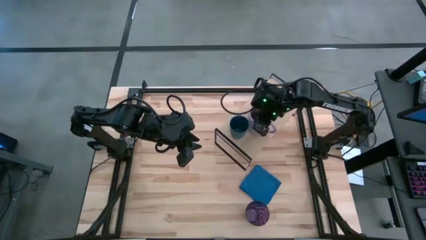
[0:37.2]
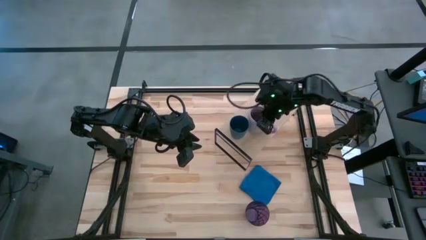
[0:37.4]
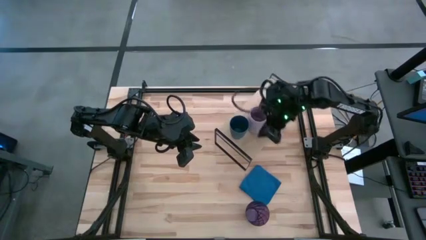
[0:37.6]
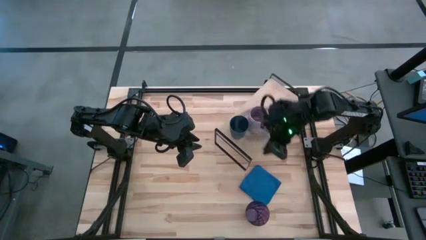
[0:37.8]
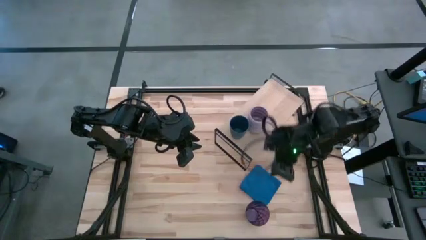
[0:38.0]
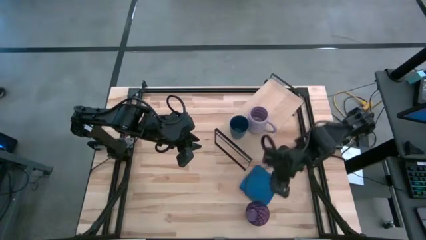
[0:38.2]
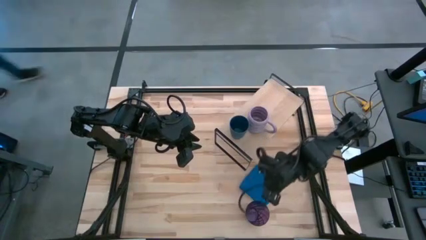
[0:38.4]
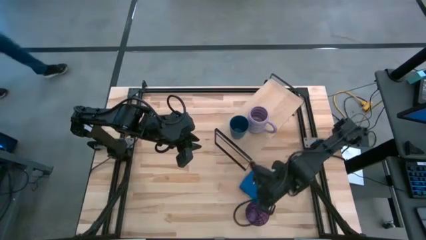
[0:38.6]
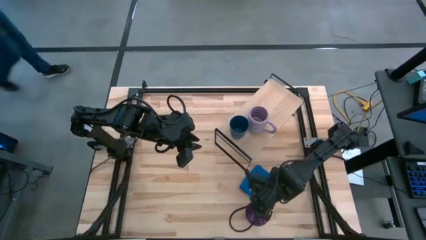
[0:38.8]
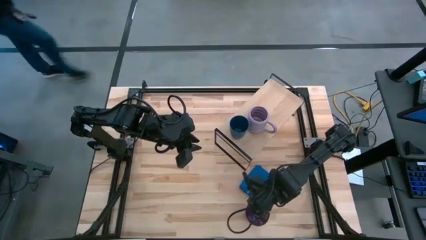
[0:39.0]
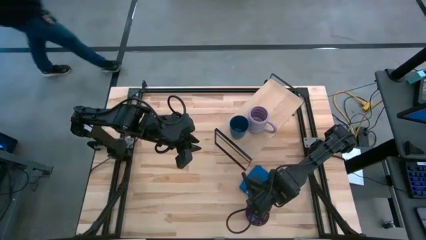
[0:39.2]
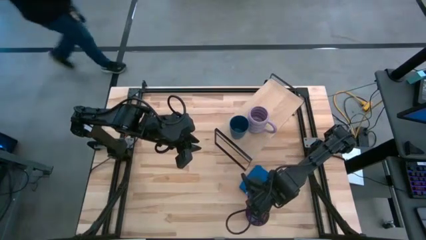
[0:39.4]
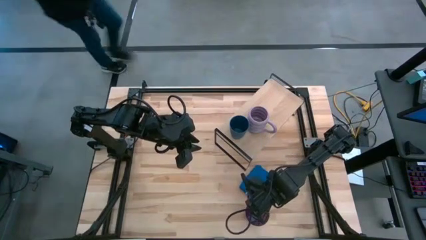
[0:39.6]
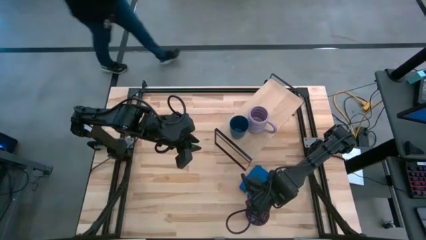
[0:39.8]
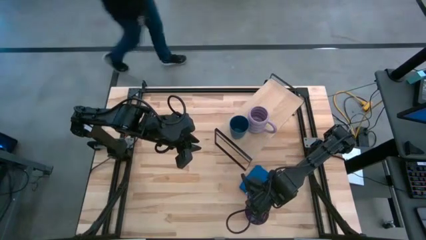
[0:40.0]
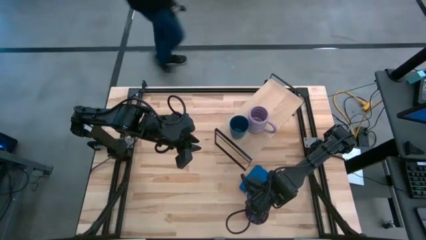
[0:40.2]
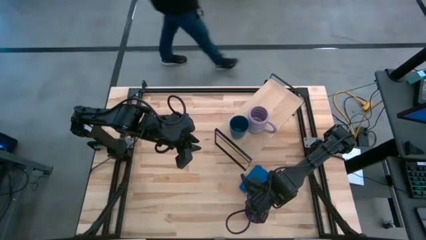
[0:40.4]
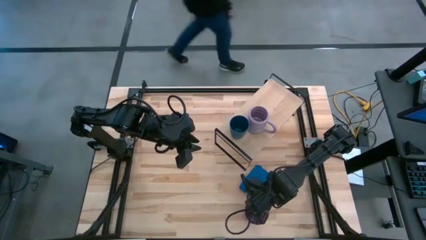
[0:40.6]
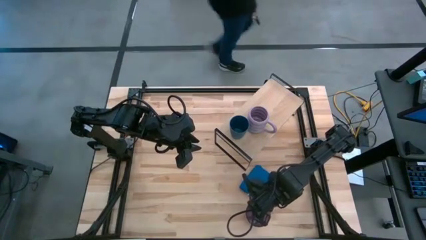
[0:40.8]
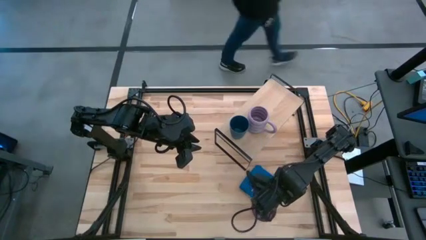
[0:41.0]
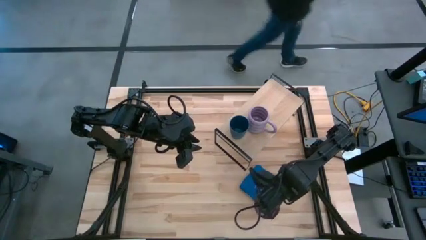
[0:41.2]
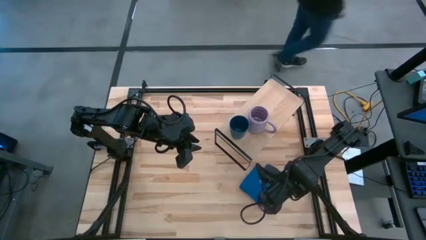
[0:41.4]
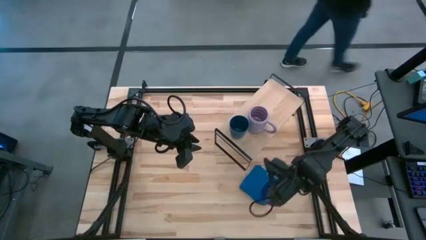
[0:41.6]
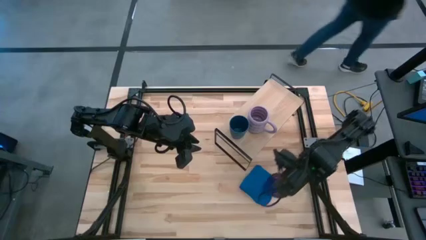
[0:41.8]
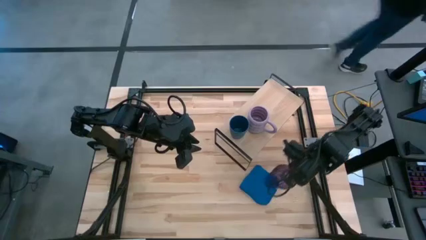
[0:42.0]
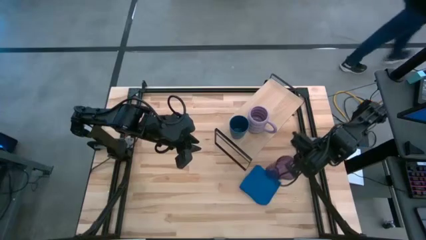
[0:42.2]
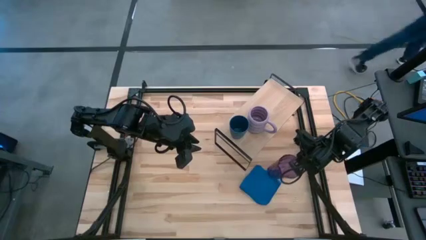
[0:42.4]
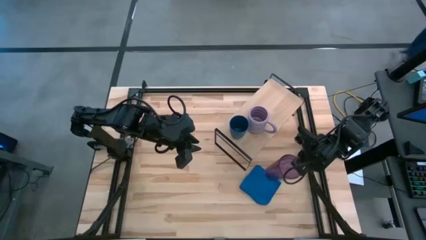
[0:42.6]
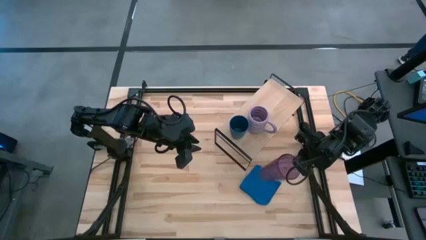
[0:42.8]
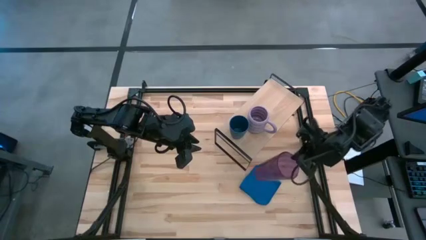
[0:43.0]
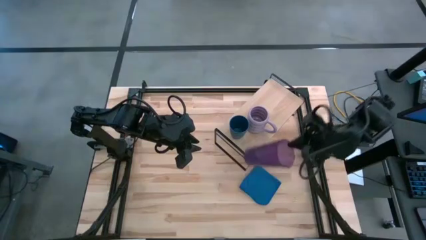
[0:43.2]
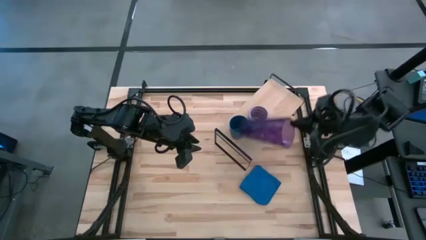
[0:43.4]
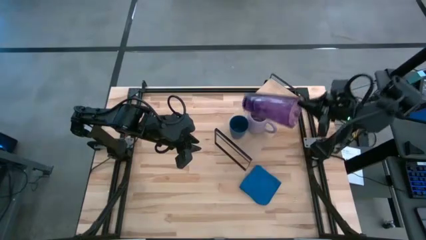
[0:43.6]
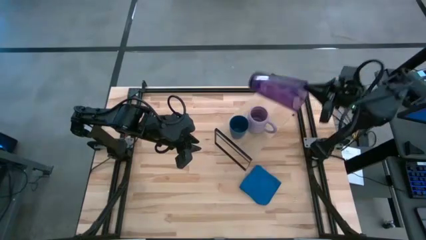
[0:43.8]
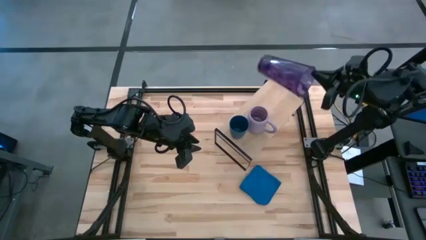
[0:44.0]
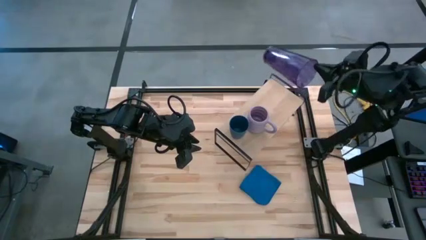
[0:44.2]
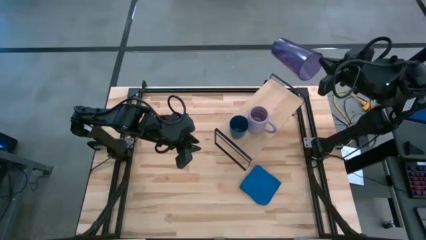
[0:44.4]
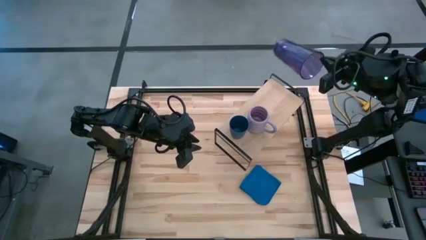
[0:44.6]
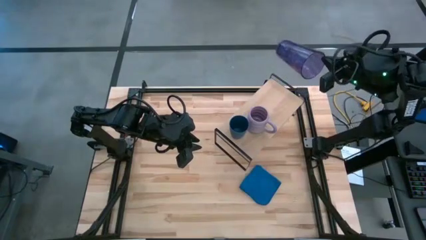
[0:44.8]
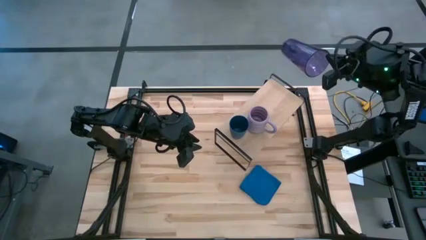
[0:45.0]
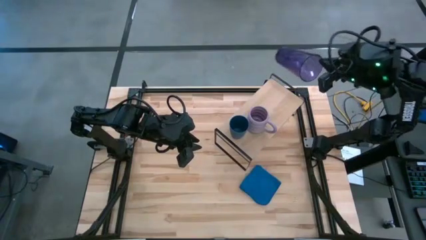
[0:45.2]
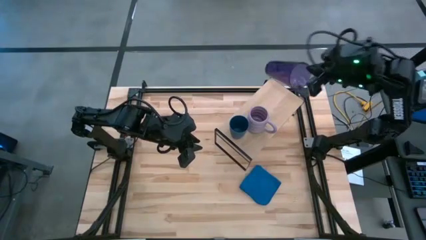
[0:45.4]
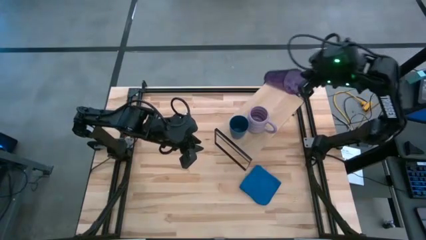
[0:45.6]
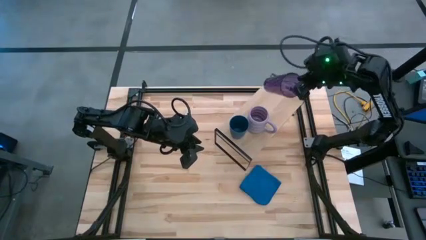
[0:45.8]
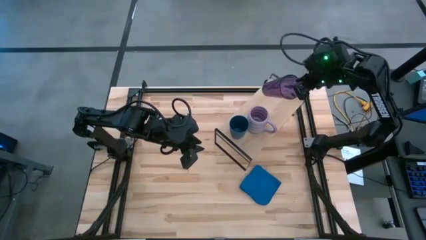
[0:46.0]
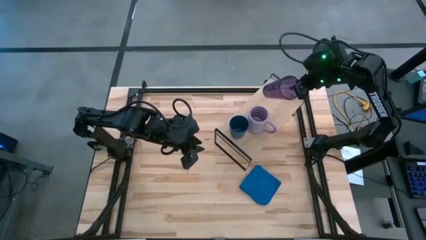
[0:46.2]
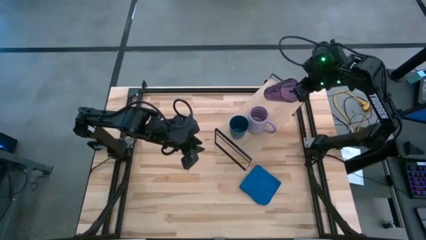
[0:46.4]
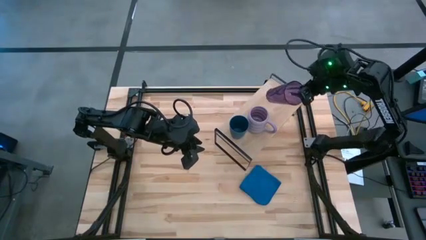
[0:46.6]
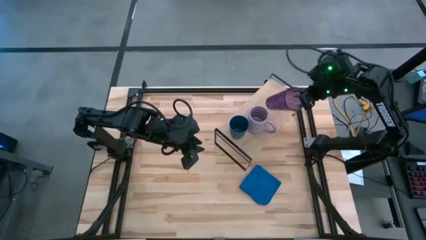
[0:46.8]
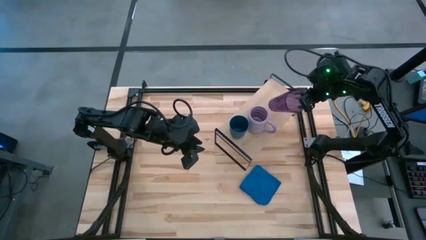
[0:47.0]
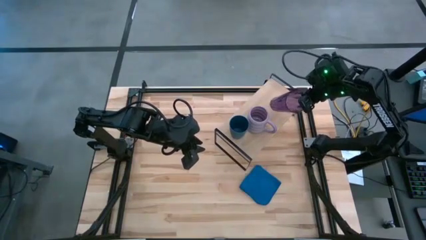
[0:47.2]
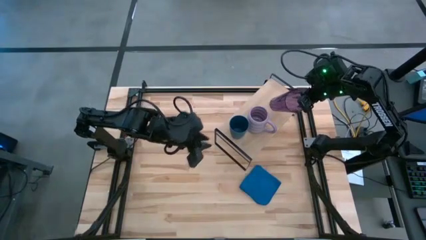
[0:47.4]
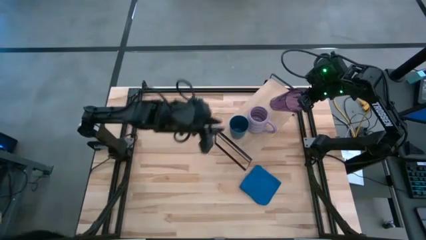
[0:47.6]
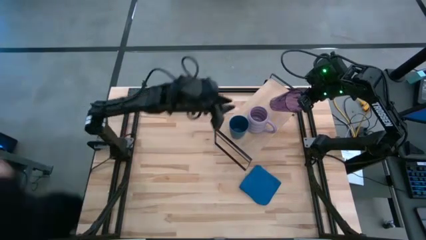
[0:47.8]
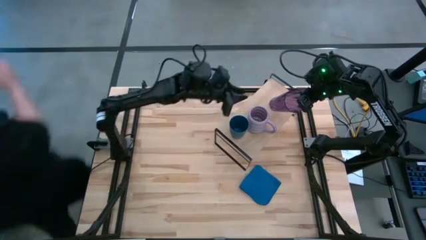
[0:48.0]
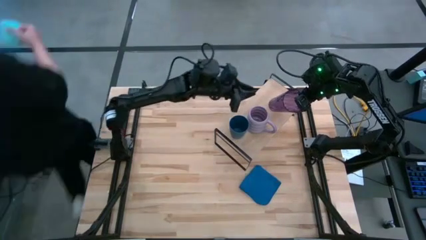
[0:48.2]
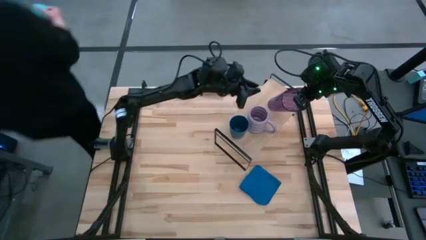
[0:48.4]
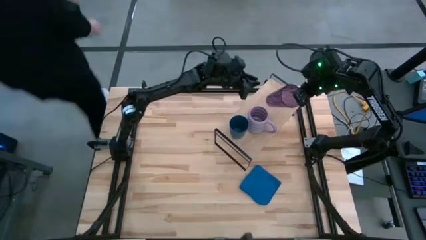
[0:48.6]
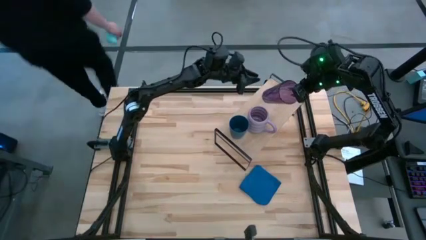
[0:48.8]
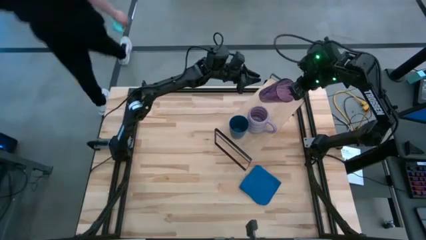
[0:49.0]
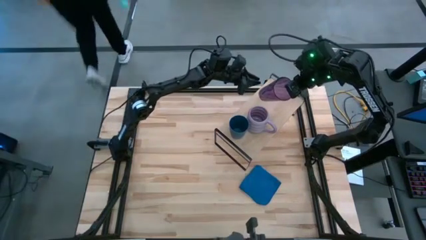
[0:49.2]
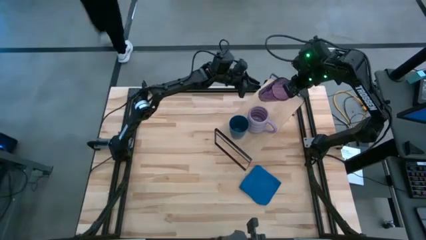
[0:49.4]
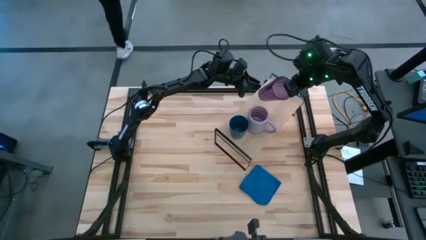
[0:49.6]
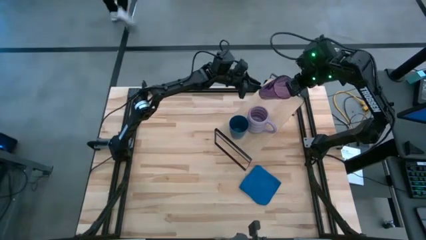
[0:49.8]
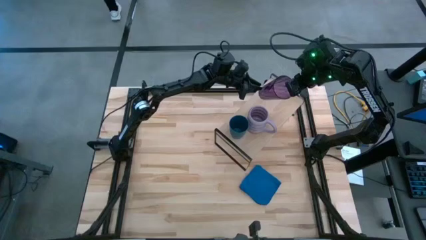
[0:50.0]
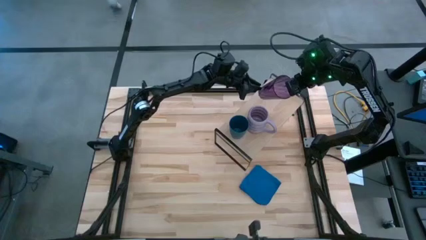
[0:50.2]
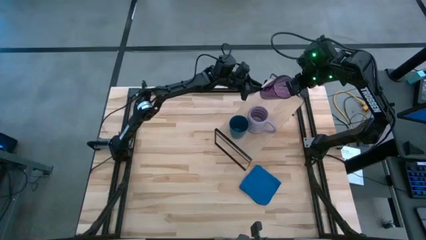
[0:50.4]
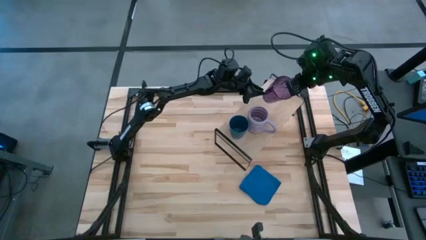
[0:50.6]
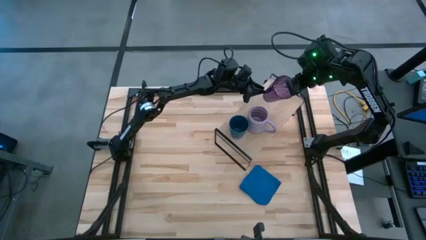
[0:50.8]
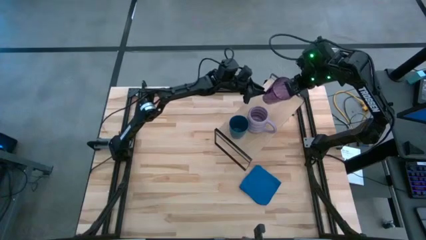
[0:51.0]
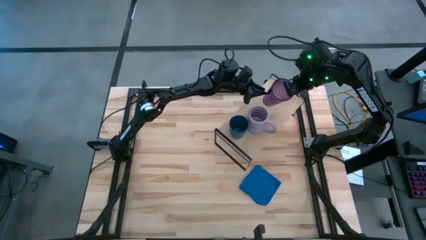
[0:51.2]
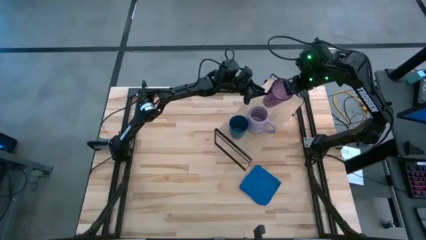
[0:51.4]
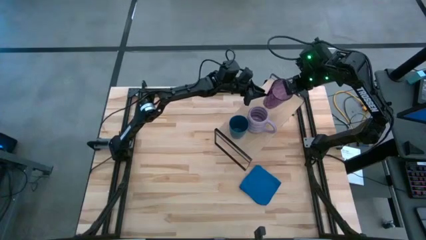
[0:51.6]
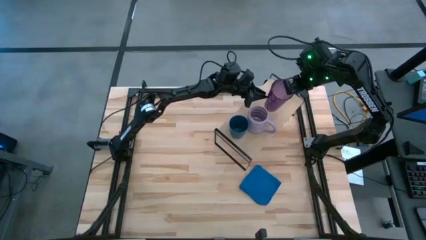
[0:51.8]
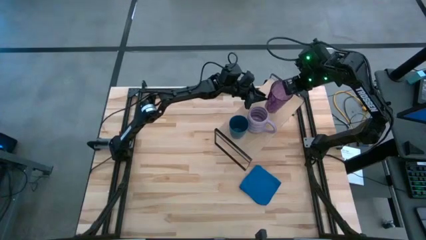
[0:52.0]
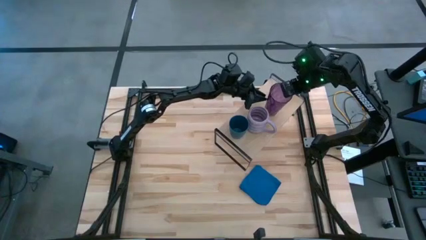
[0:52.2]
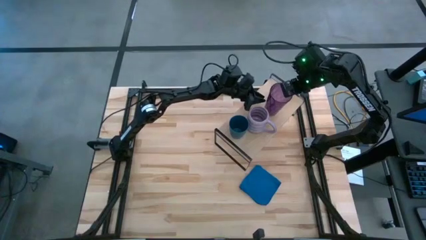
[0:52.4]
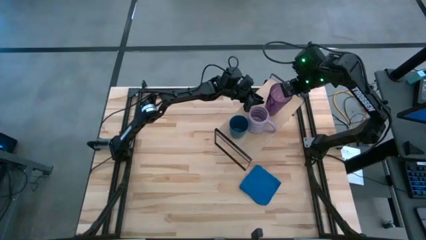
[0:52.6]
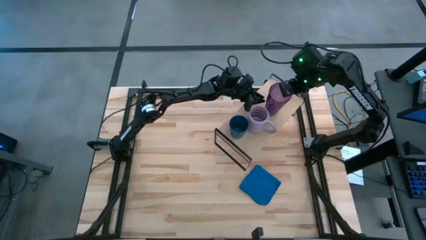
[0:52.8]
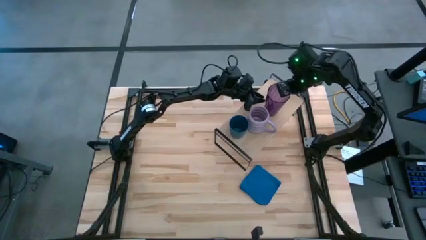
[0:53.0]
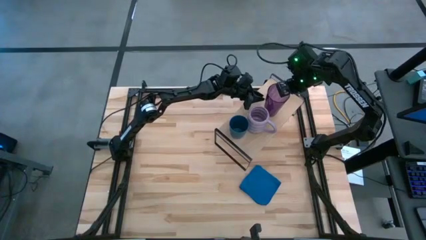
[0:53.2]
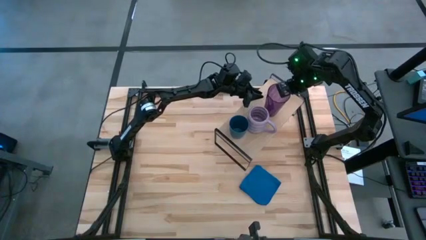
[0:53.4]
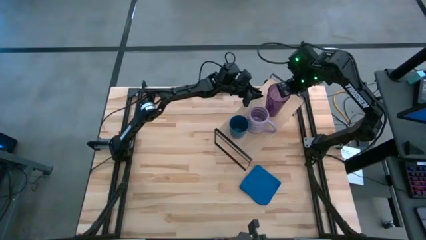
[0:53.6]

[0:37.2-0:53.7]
Task: Stack small to large cups/mugs on shelf
Put the violet cup on the shelf
